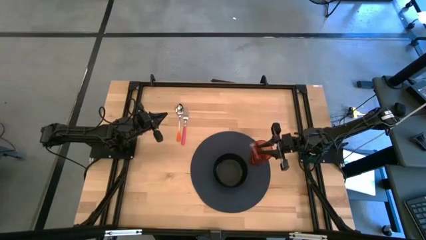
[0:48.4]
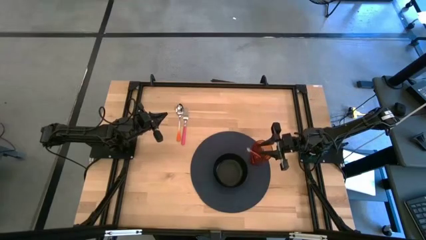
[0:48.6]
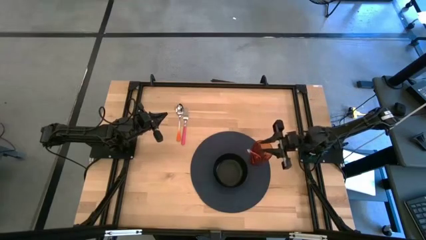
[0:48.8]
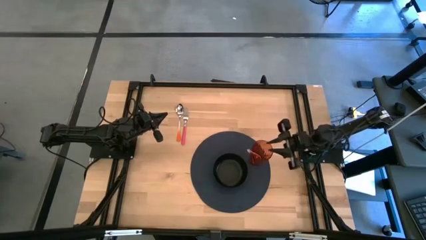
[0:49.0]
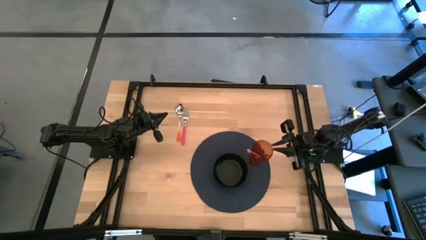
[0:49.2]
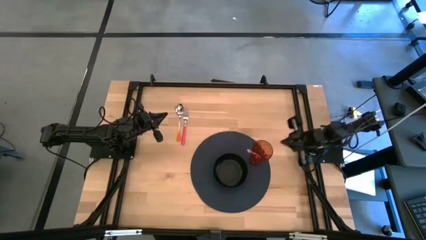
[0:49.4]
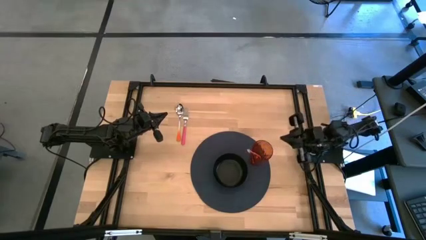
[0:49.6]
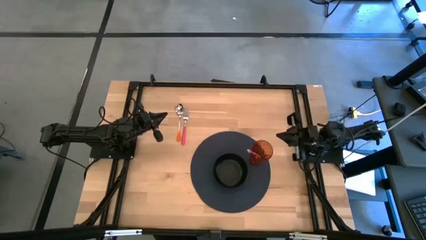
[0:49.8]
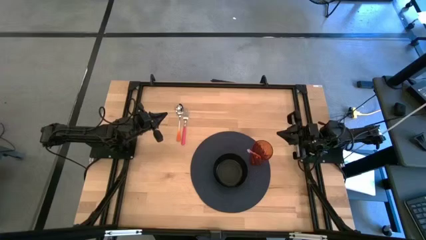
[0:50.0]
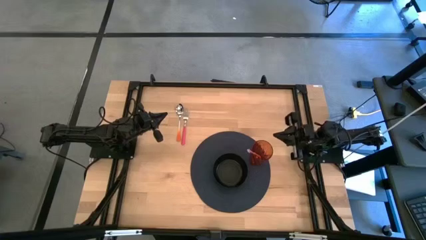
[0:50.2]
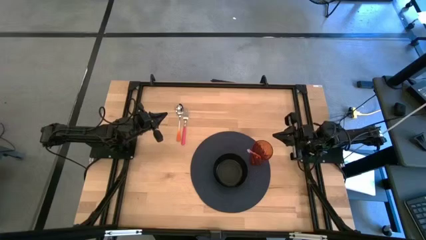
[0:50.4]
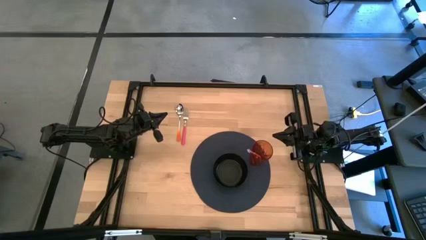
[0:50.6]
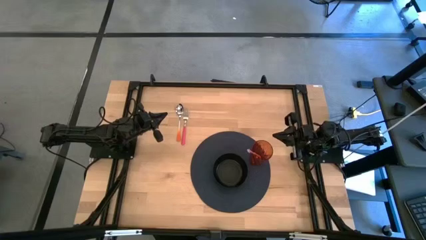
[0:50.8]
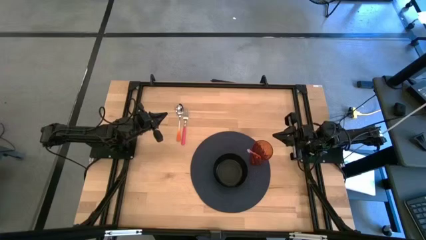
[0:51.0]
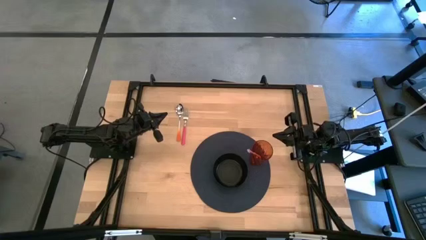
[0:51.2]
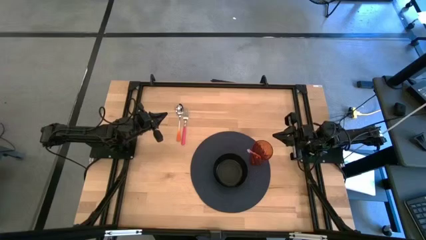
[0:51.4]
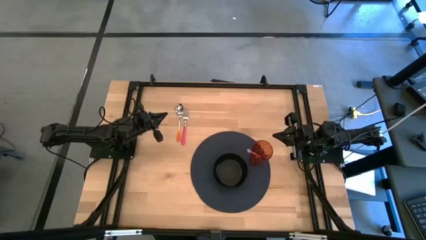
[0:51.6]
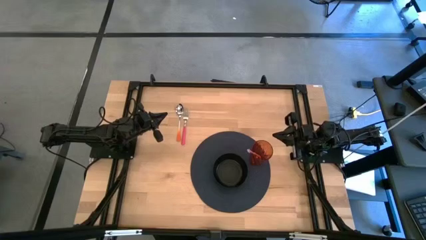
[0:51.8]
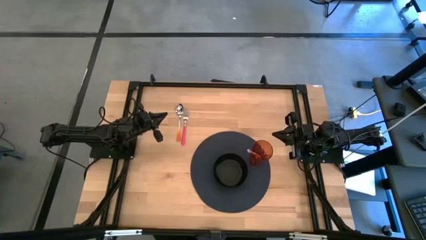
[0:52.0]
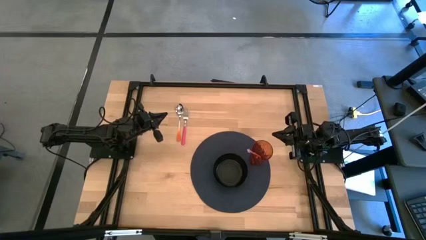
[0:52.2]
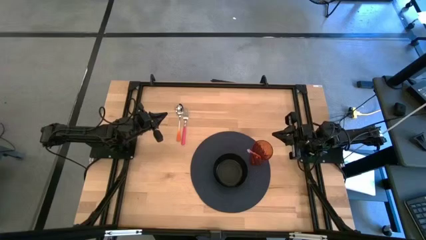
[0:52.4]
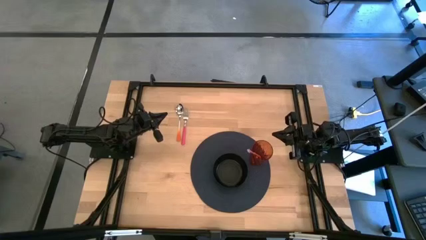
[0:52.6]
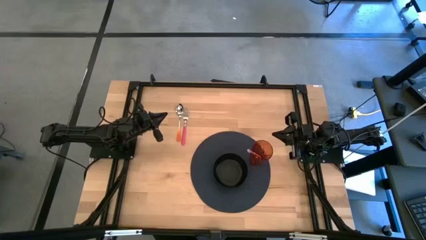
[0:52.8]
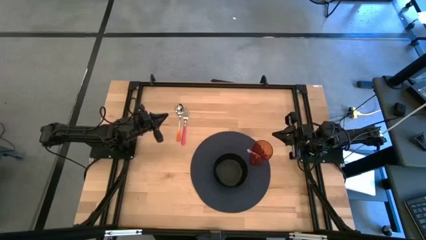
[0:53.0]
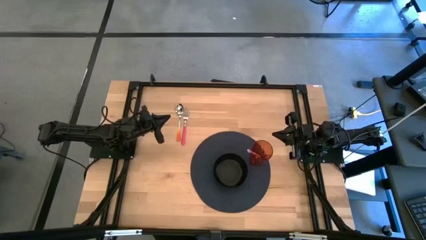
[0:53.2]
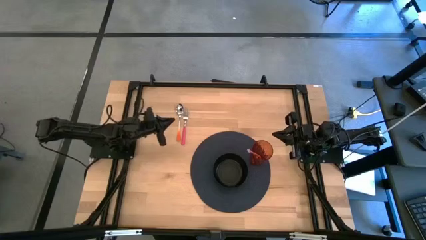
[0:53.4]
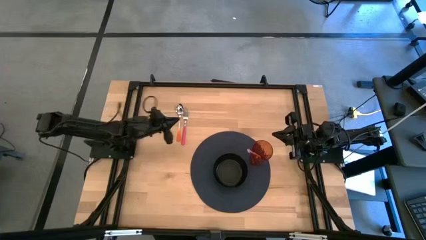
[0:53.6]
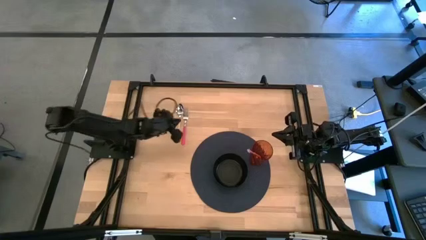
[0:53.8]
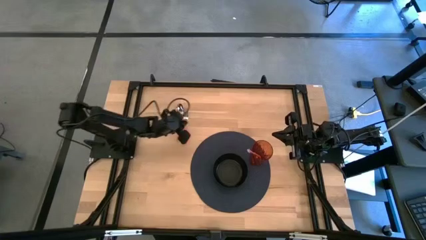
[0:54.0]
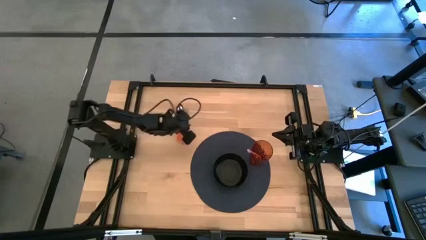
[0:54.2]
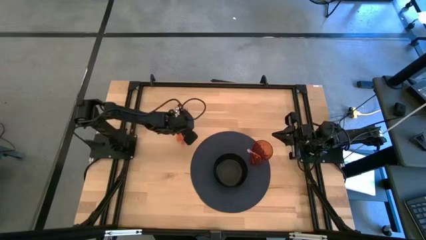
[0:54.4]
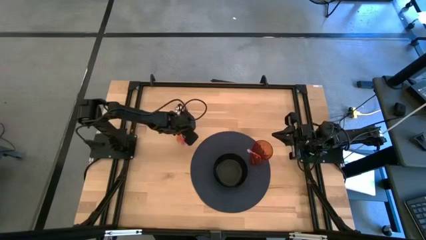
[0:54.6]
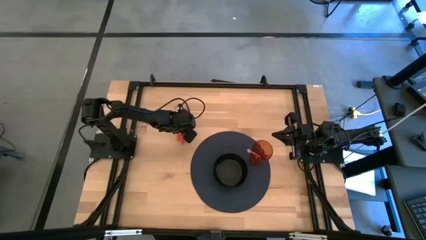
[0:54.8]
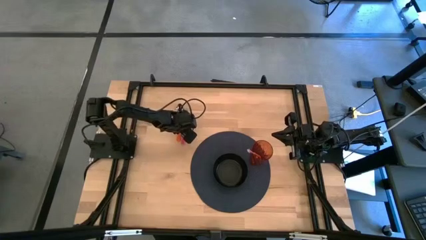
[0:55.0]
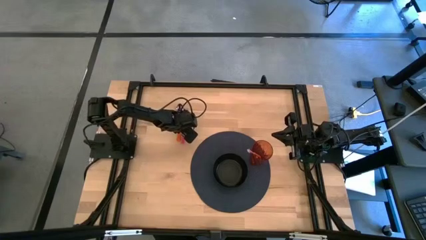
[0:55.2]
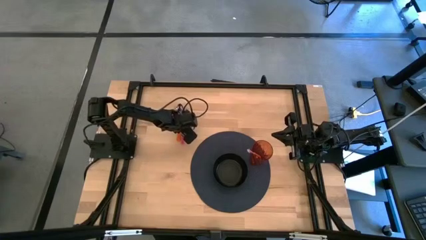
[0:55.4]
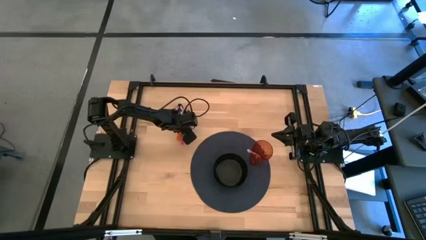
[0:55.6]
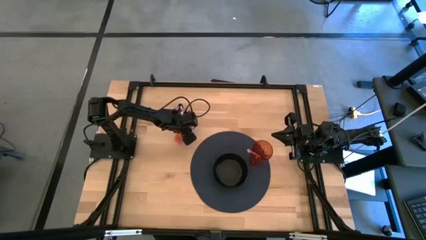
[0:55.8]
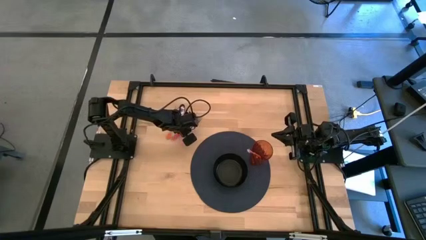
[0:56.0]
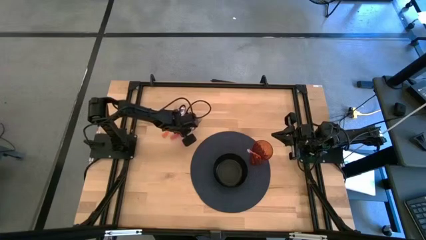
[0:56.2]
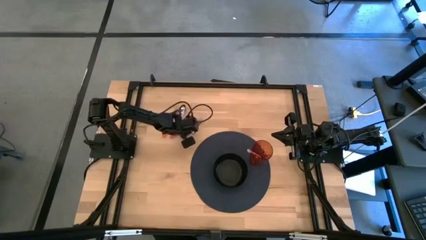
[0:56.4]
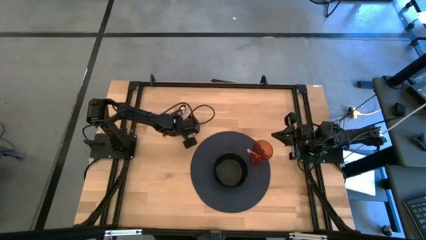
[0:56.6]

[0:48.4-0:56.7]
Task: Pick & Place Utensil
Put the pink fork into the black bowl on the blue mat

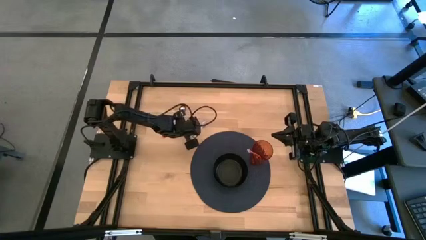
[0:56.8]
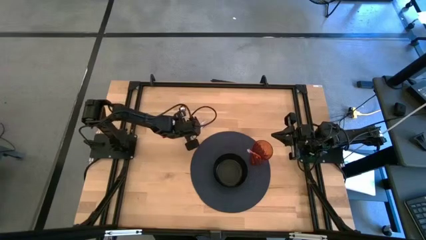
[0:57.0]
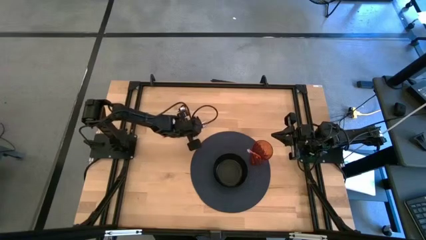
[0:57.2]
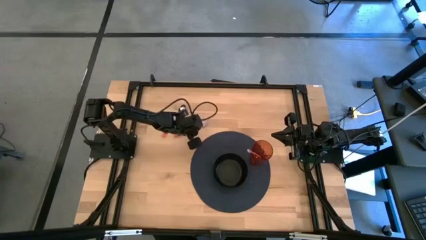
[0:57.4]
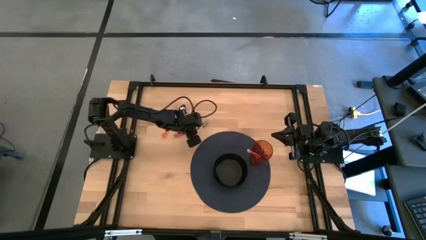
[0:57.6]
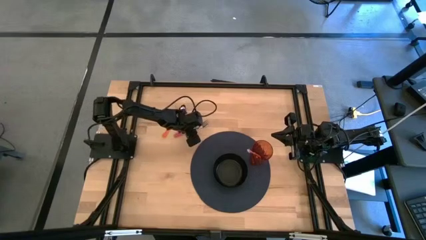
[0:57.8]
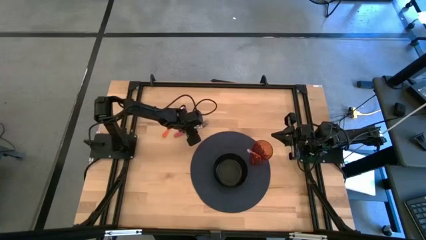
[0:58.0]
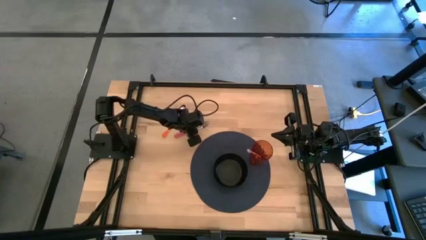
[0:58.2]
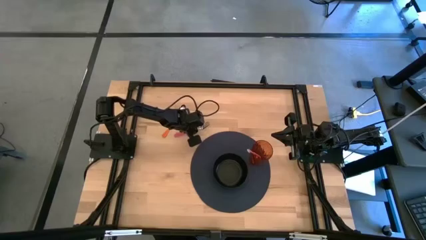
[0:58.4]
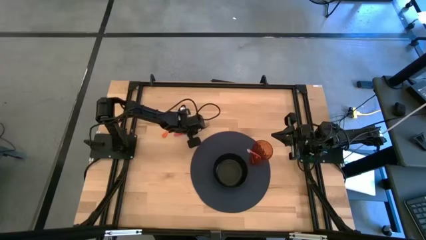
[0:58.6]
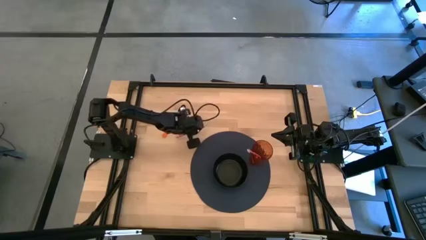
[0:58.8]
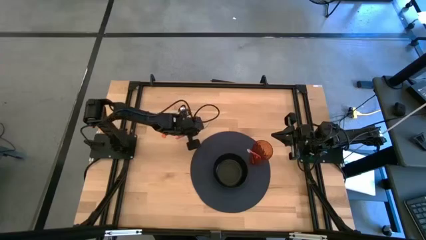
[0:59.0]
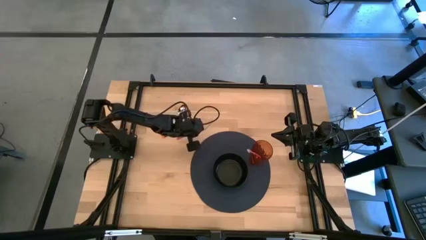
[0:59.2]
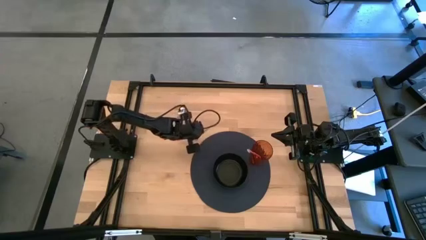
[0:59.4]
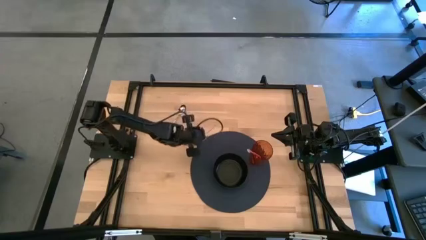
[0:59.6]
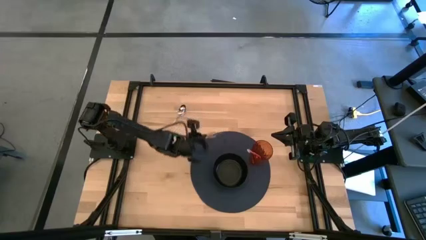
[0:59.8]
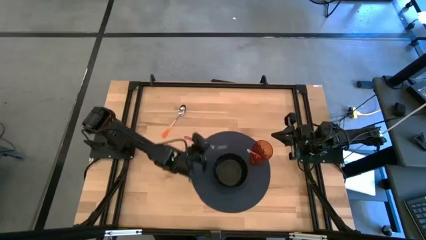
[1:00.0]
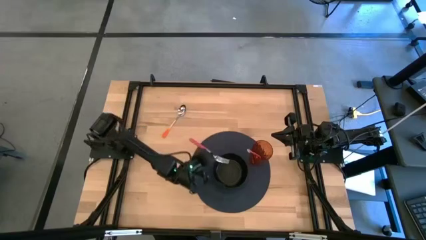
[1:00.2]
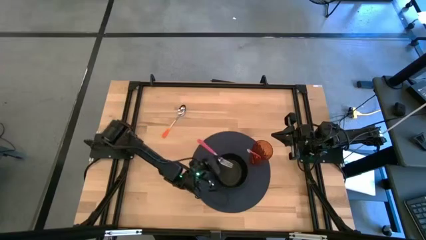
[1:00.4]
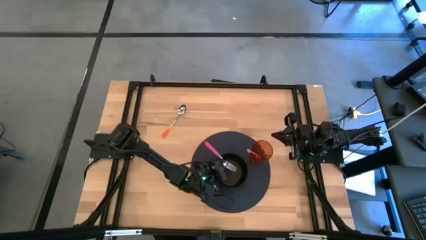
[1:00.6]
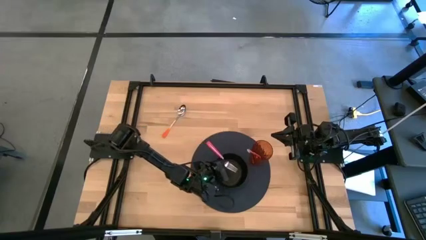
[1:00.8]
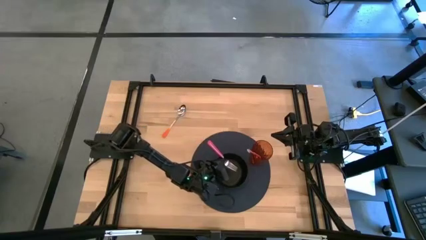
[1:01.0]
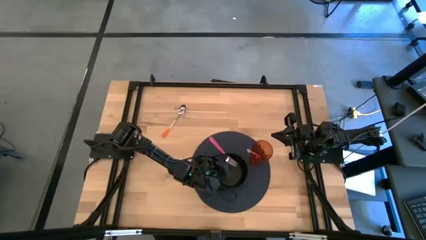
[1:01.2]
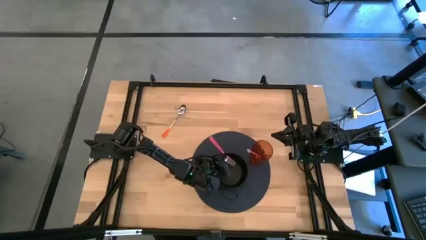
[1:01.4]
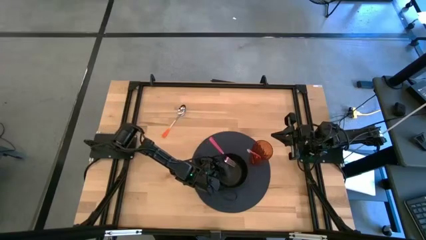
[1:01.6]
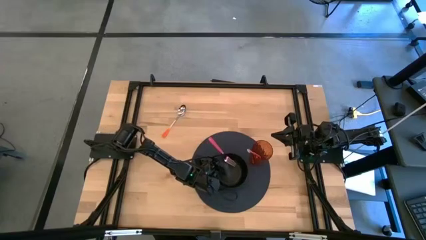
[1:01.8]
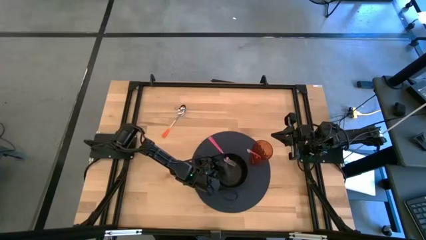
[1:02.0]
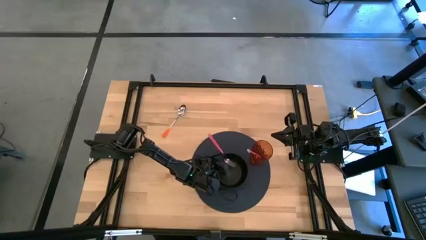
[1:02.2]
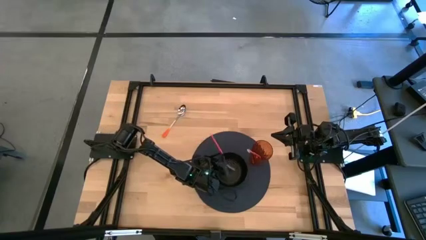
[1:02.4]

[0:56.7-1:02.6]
Put the pink fork into the black bowl on the blue mat

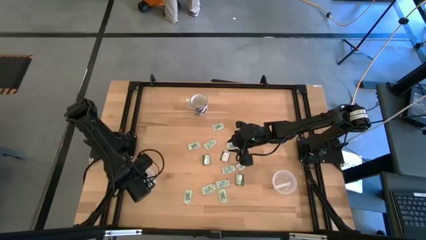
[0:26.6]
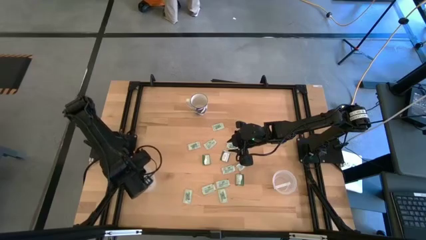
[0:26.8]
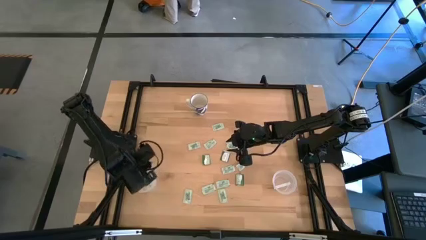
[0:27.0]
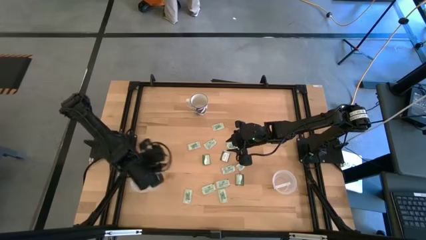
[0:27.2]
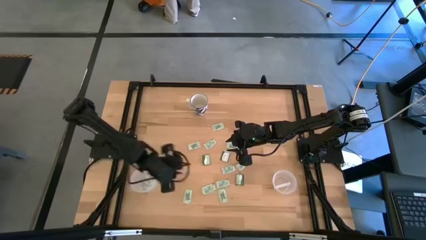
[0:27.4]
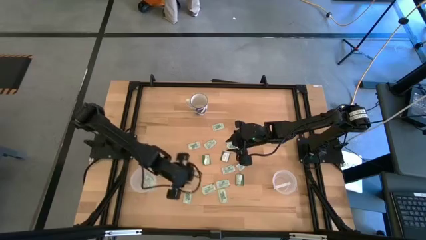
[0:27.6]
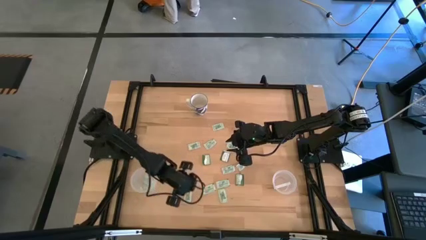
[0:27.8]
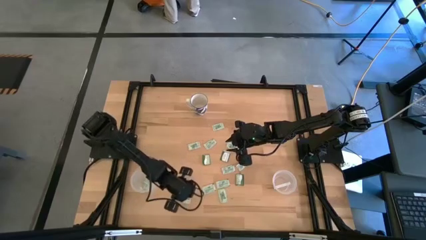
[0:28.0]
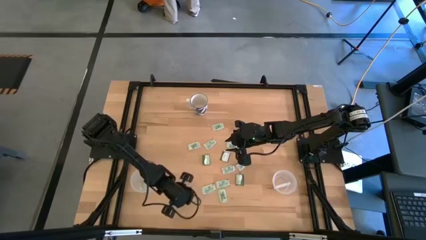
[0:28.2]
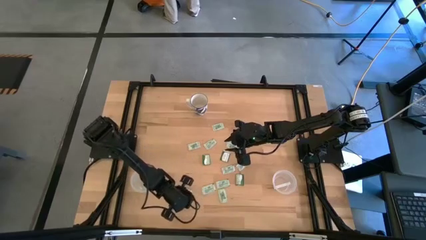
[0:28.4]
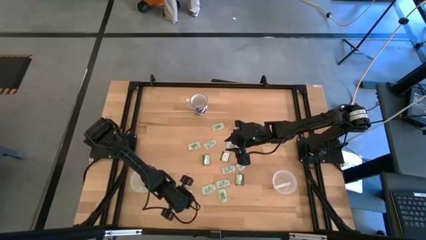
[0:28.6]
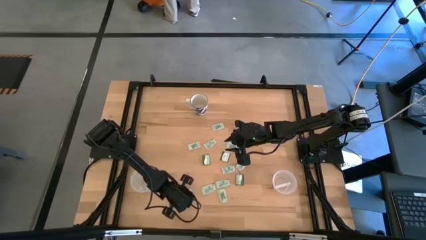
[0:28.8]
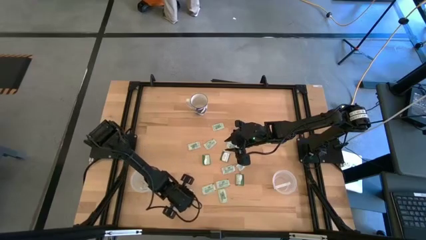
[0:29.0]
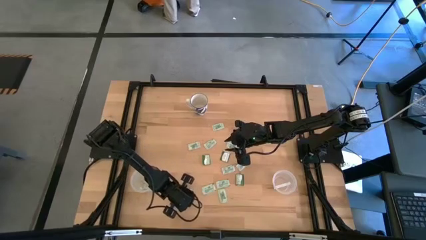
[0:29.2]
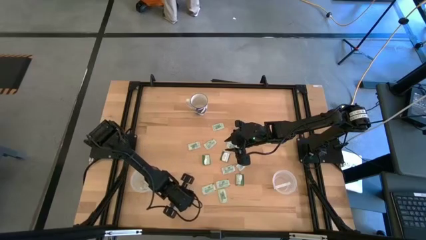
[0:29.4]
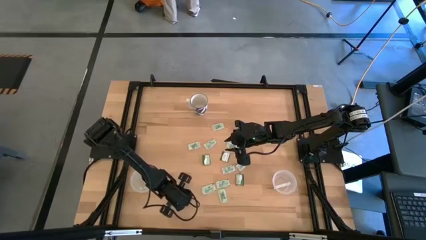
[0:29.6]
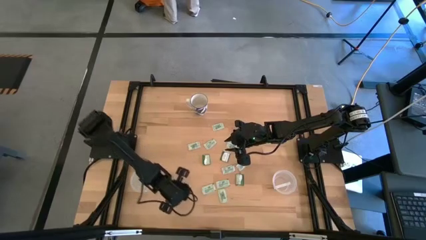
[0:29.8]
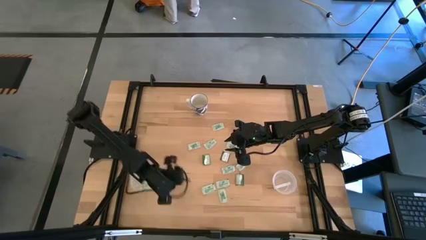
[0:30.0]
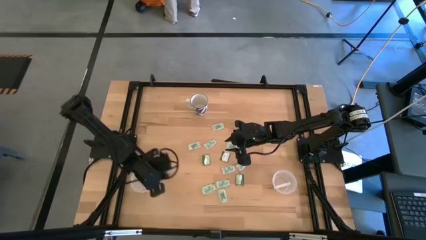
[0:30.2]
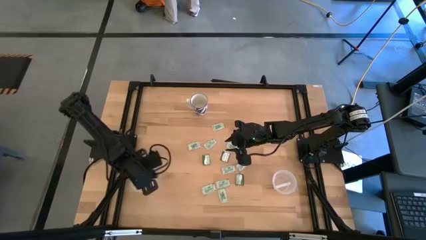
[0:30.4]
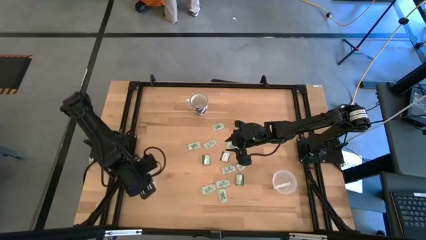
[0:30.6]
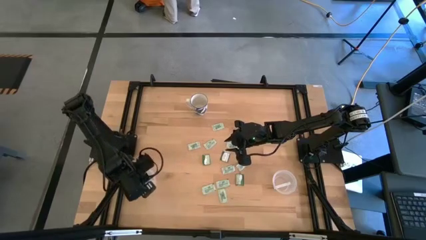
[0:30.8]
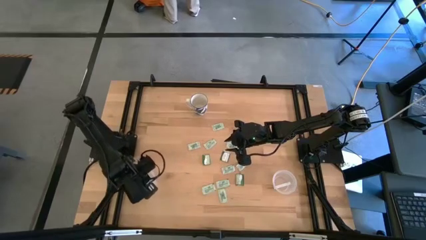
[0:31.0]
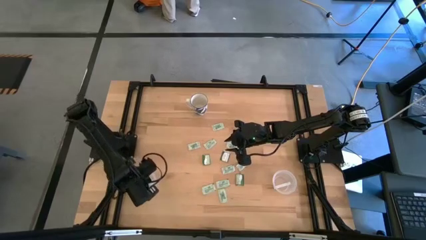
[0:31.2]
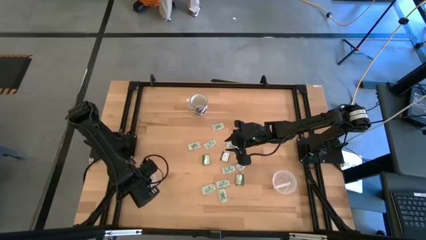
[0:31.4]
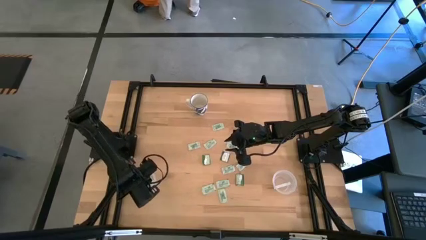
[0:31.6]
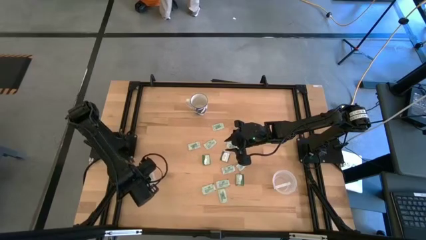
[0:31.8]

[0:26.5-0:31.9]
Task: Pick and place Stevia / Truvia into bins
Put the light green stevia packet into the left transparent container
